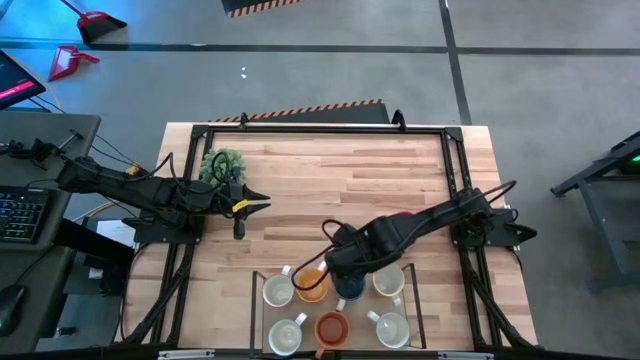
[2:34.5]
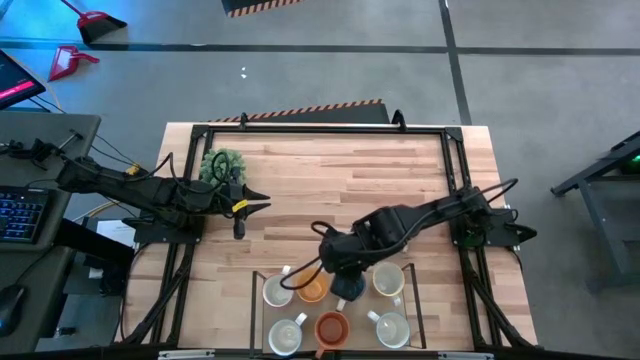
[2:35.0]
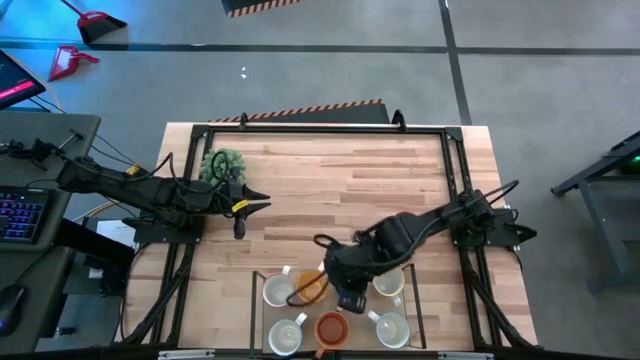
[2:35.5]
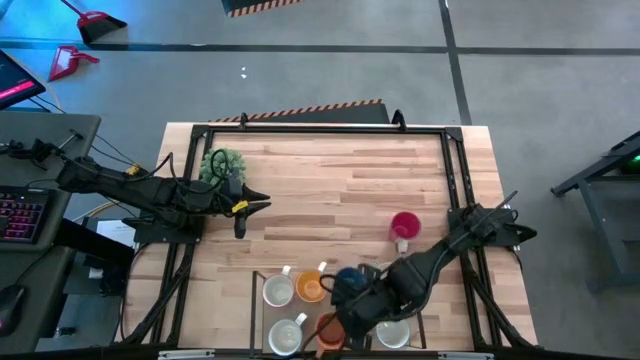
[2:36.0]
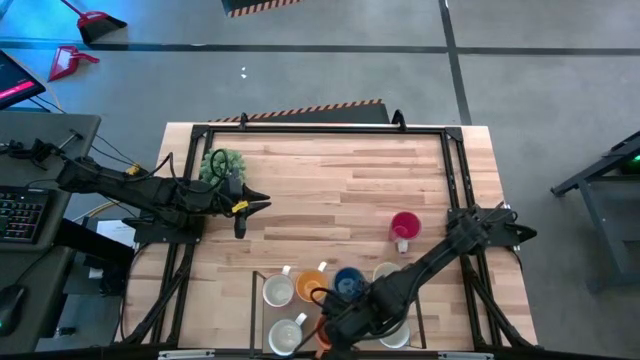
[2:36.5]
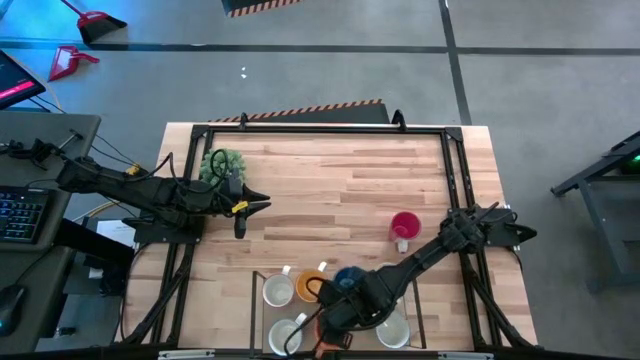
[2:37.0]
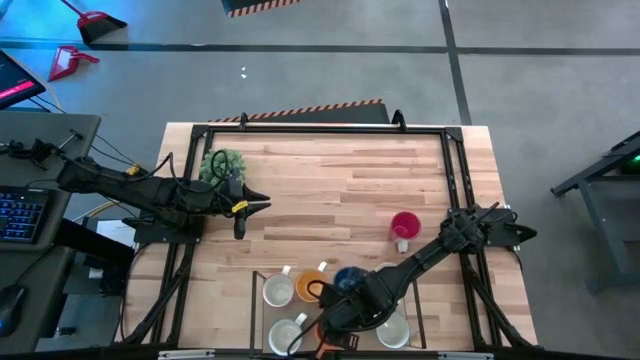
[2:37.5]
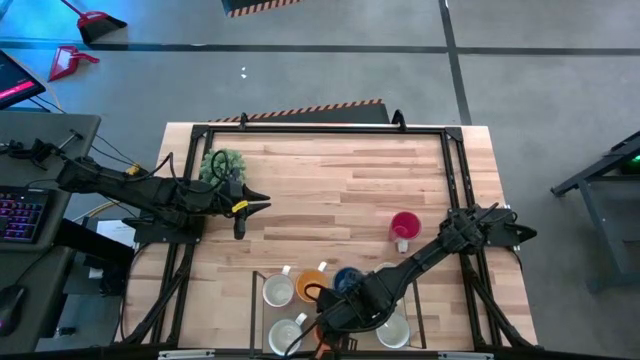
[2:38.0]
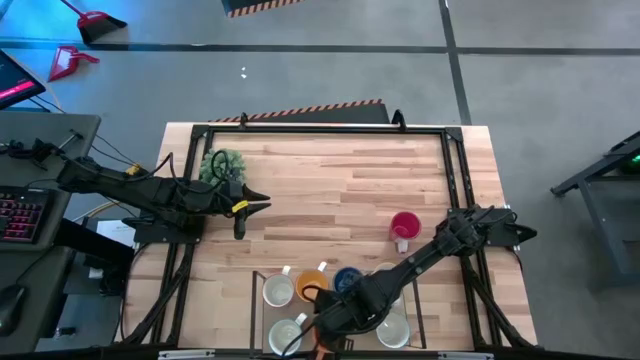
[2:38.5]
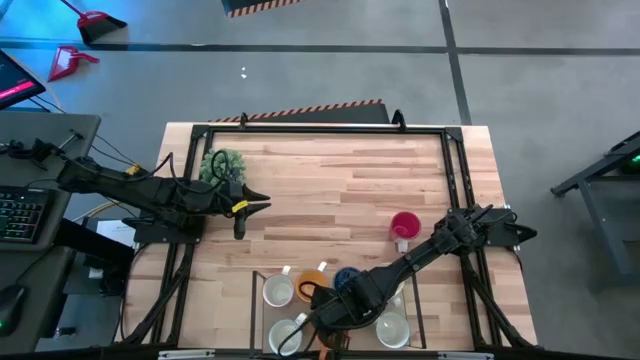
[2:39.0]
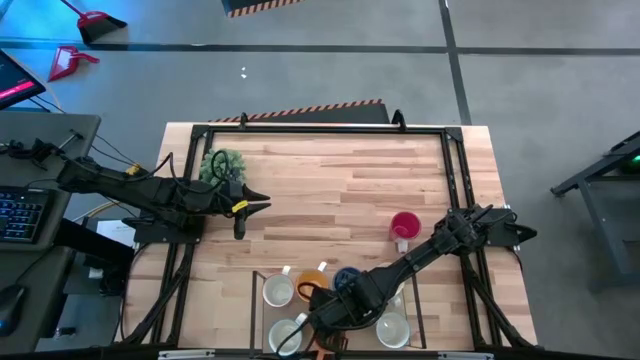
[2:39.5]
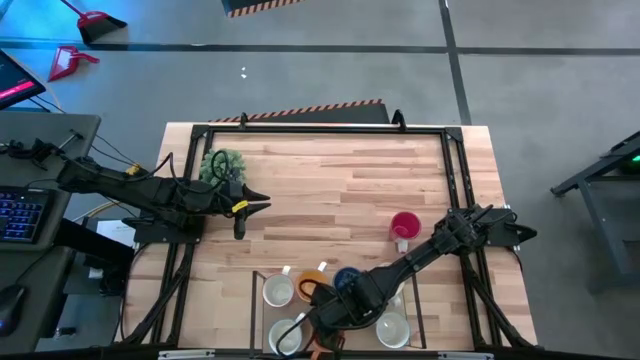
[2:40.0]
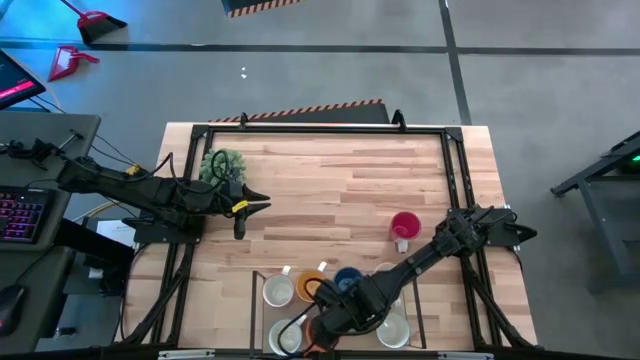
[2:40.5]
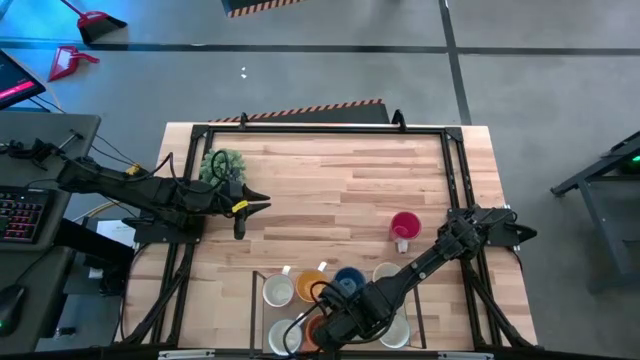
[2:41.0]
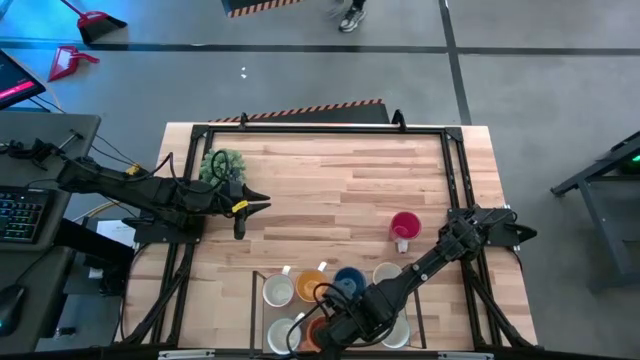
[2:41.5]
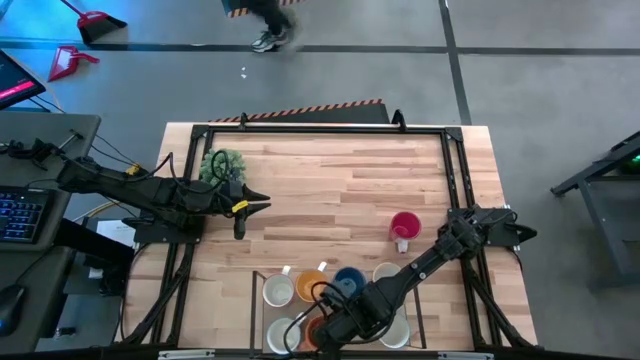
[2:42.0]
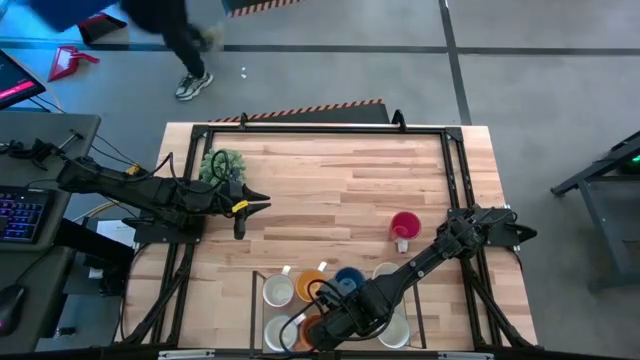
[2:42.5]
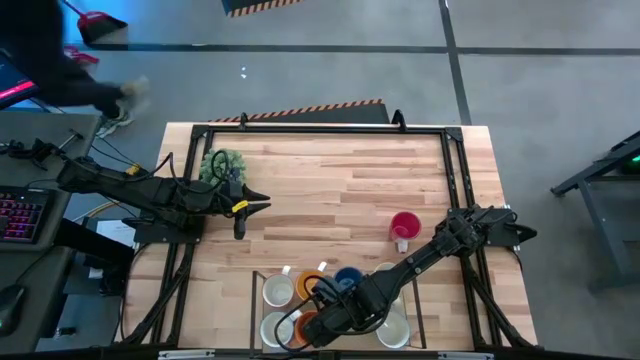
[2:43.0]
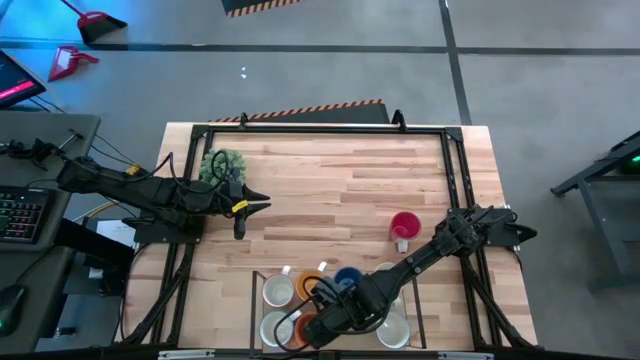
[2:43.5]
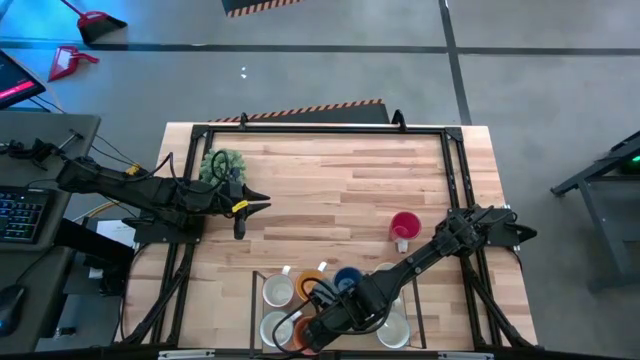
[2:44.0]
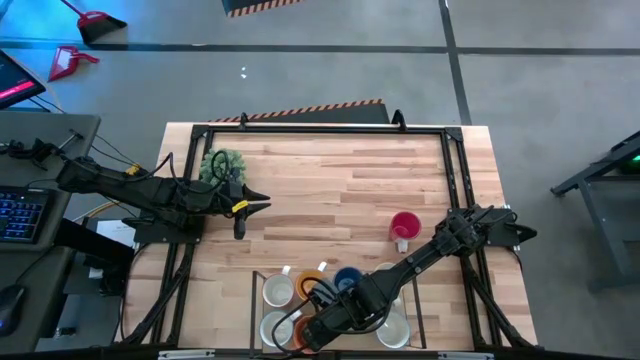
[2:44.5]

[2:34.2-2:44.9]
Task: Place coffee mugs
Adjust the orange mug on the shelf

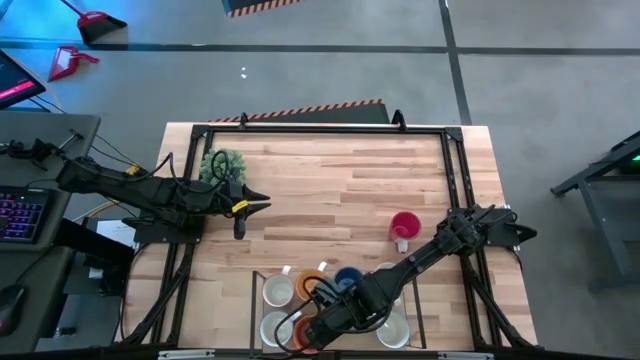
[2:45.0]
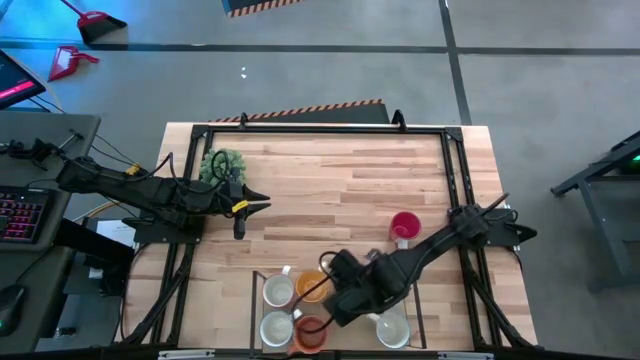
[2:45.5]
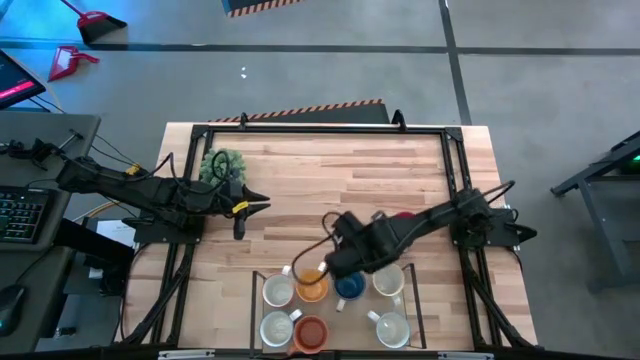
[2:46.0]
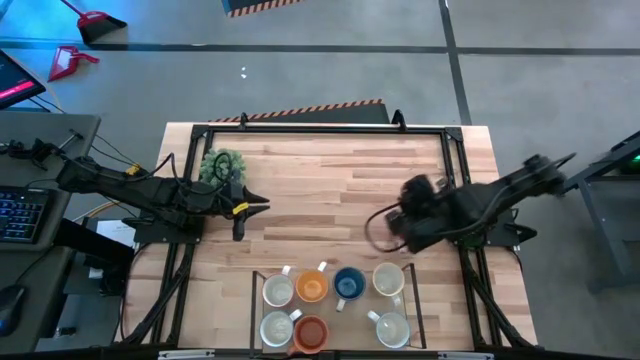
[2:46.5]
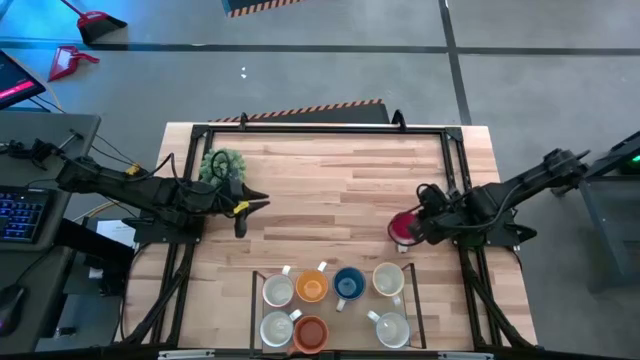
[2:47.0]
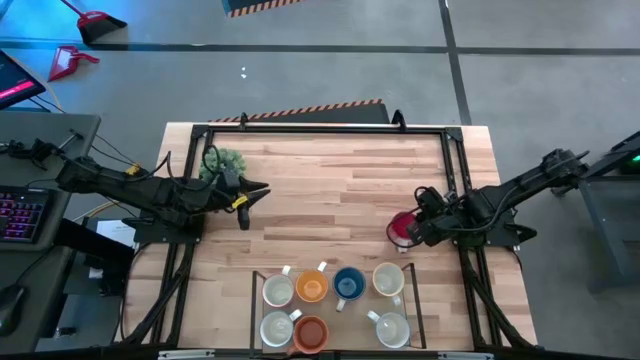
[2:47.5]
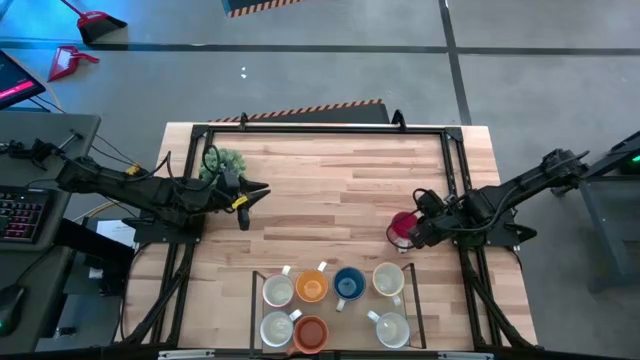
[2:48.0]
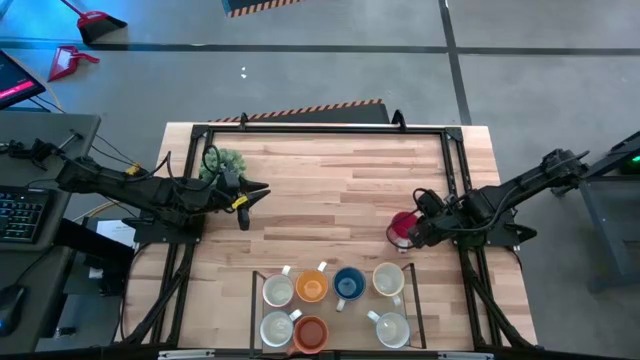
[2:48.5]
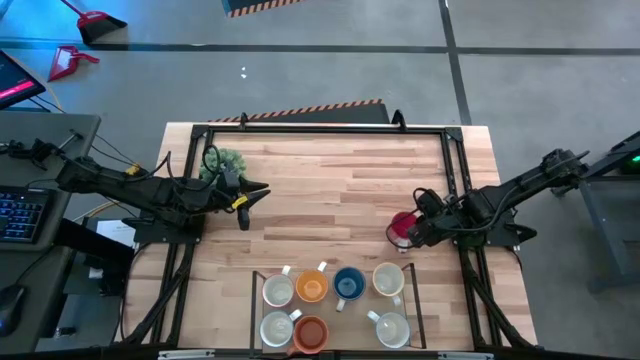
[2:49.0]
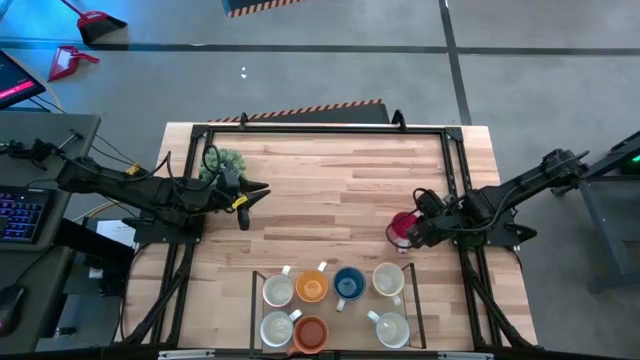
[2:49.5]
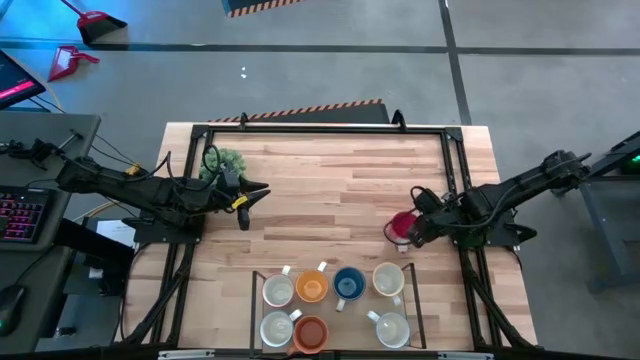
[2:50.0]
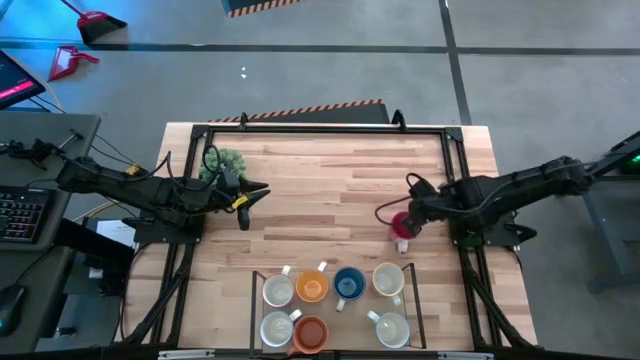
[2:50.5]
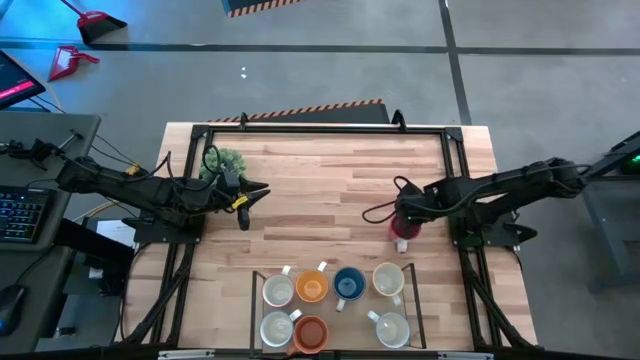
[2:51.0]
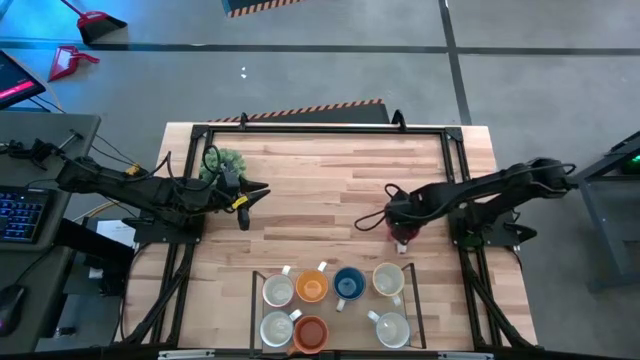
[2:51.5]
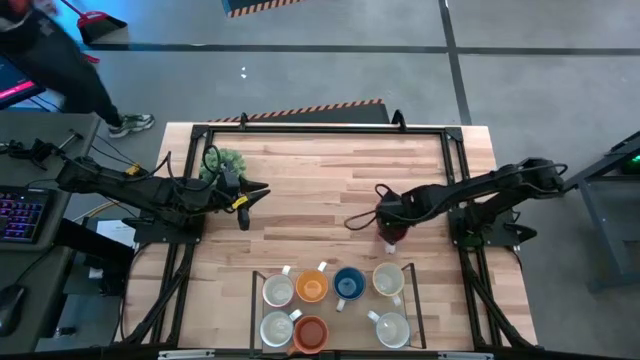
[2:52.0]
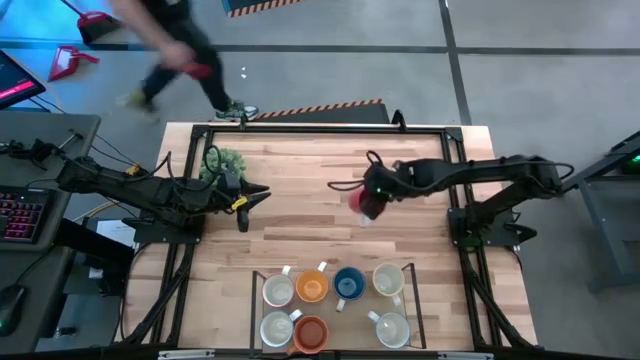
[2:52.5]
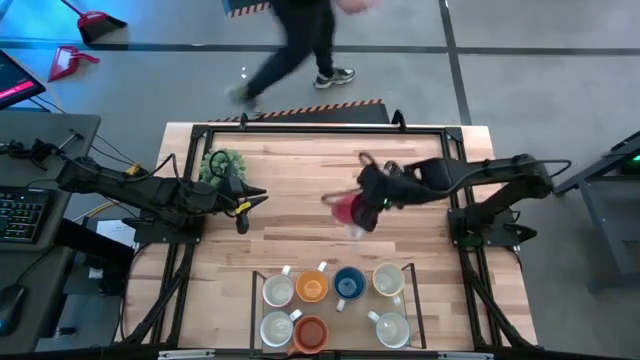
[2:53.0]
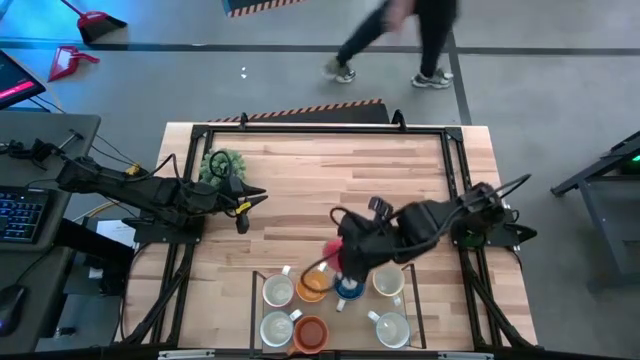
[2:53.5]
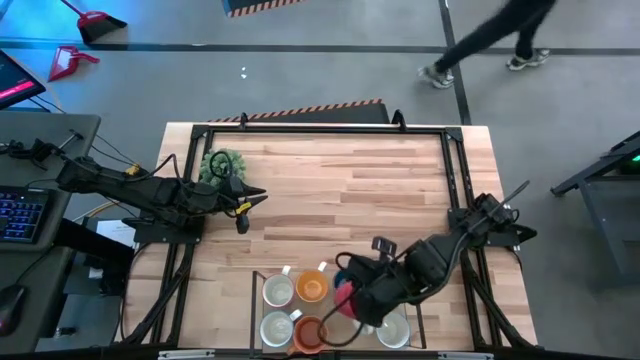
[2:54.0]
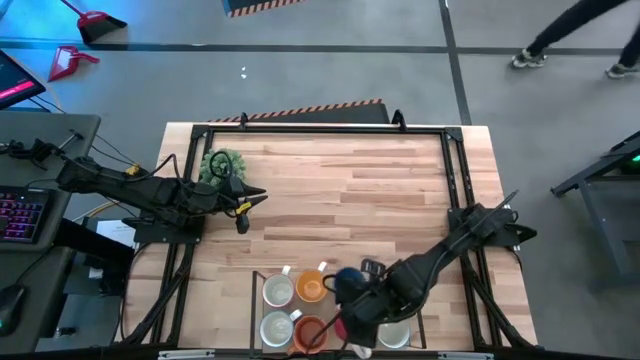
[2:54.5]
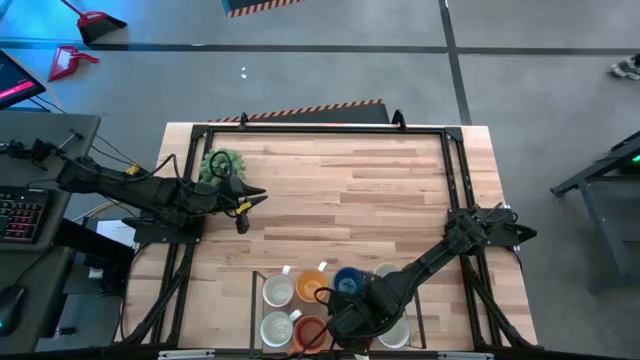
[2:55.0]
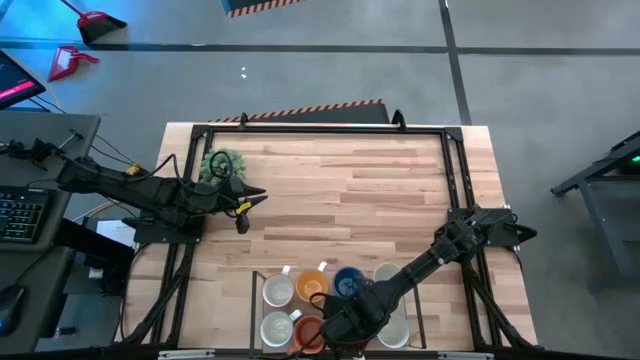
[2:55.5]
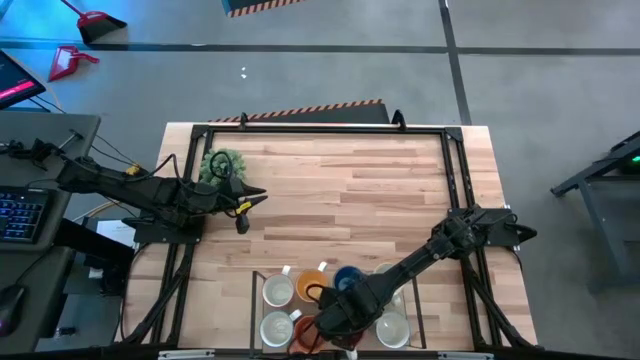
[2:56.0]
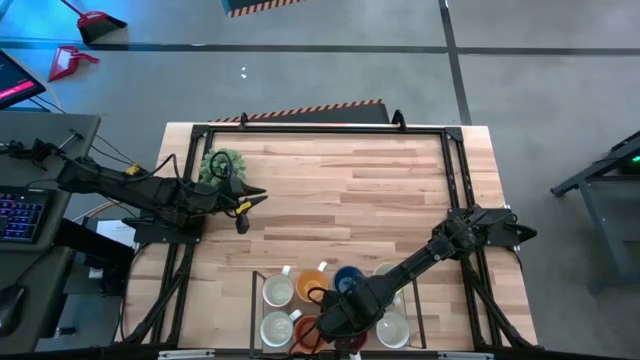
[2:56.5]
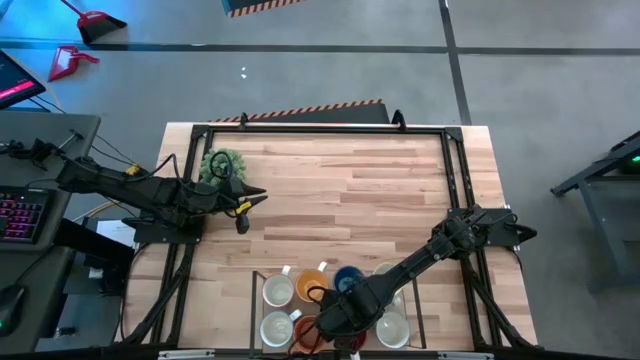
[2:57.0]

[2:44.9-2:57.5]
Put the red mug the shelf
